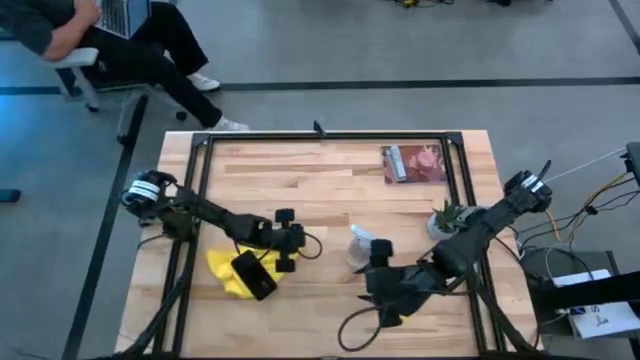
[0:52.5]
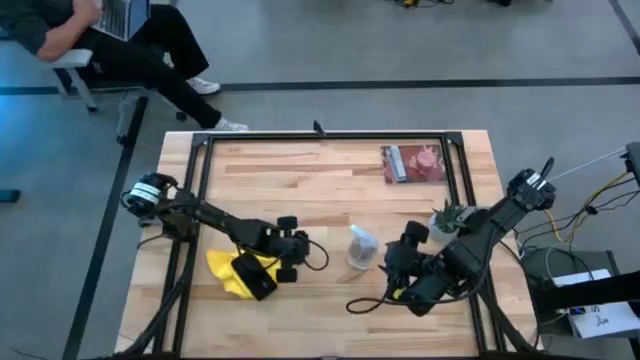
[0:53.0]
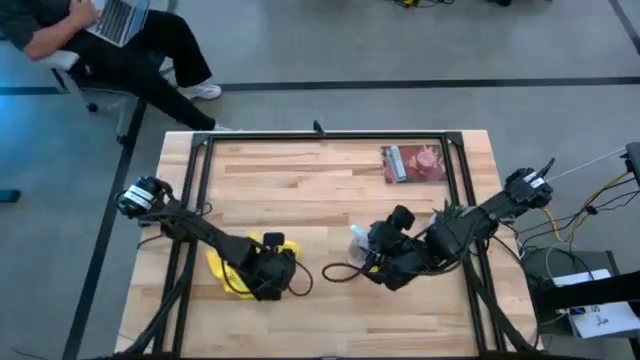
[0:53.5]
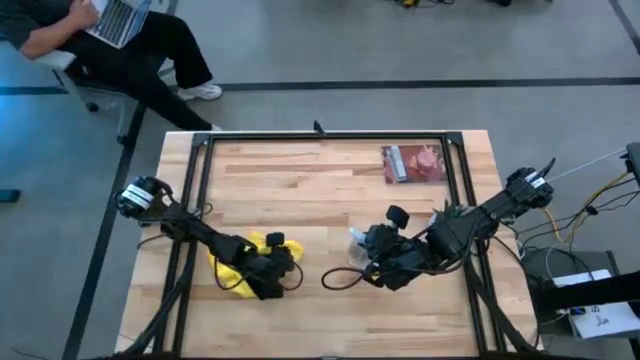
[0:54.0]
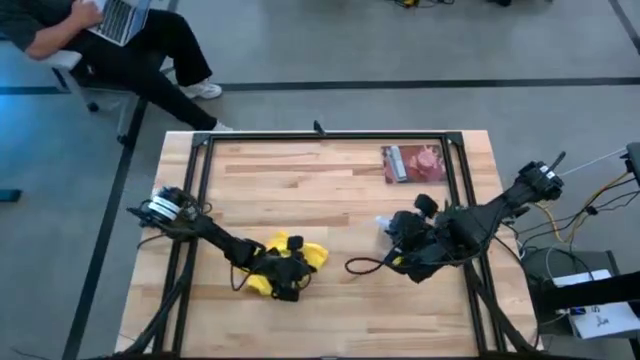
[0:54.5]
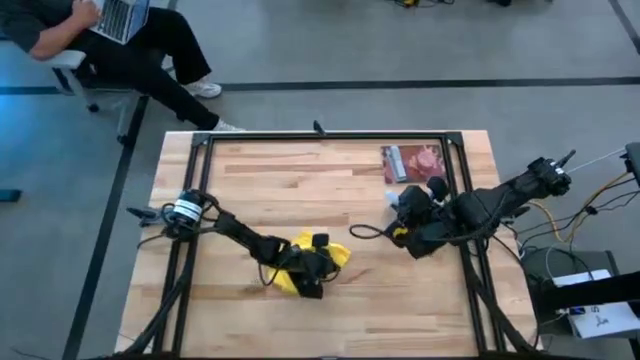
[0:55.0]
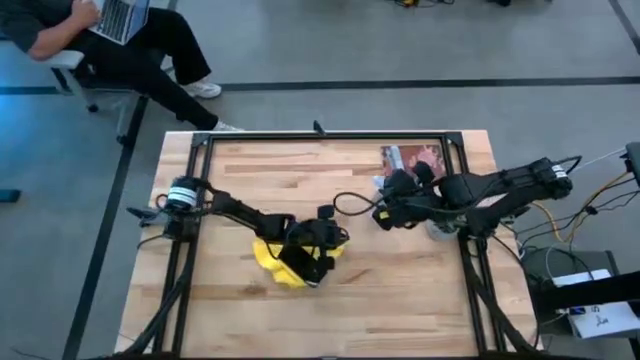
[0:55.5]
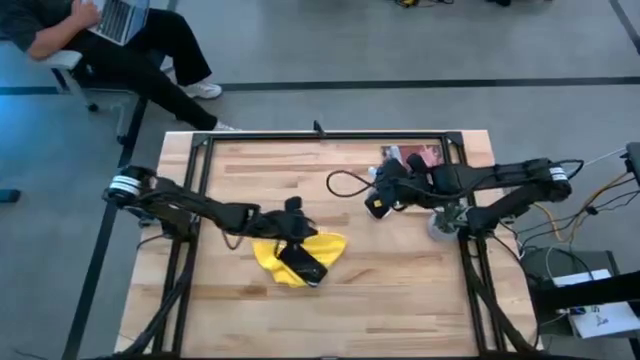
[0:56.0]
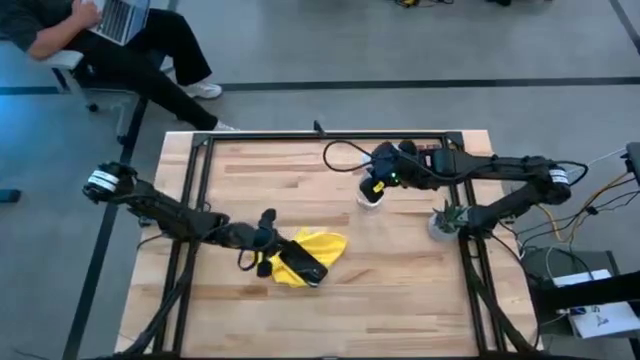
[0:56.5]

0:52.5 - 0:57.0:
Task: Apply microfiber cloth
Move the spray bottle to the top of the table

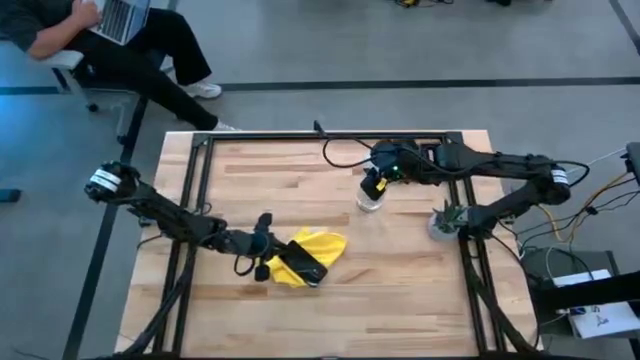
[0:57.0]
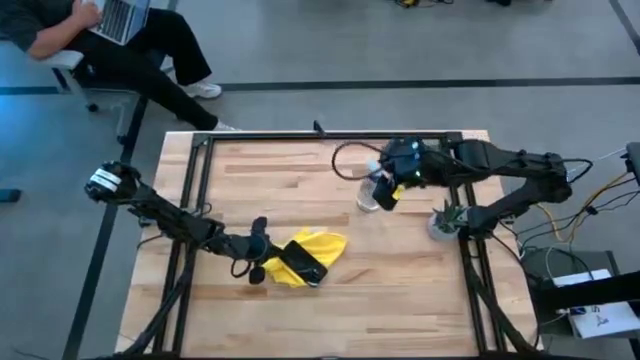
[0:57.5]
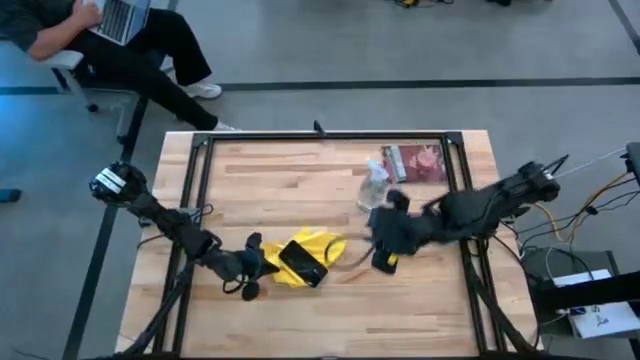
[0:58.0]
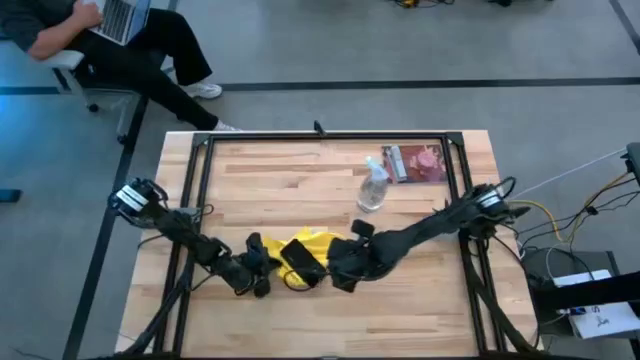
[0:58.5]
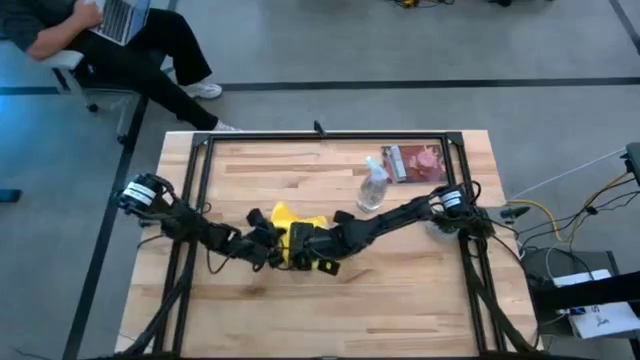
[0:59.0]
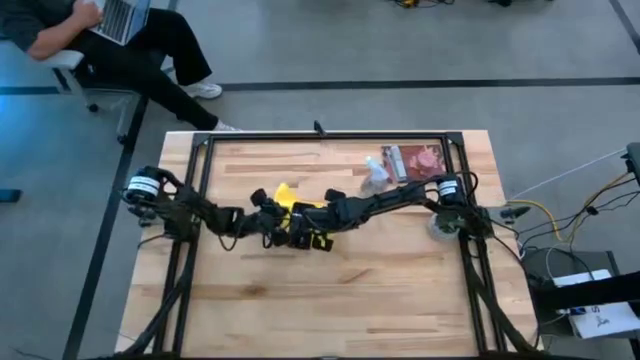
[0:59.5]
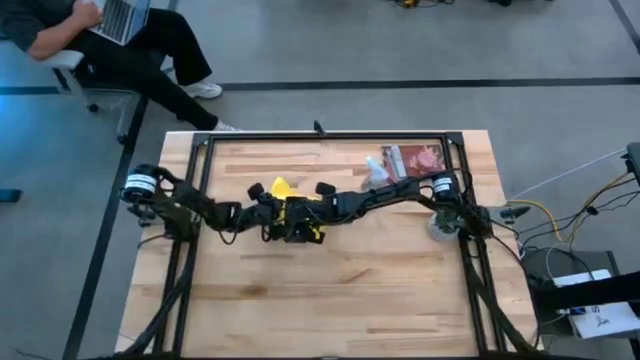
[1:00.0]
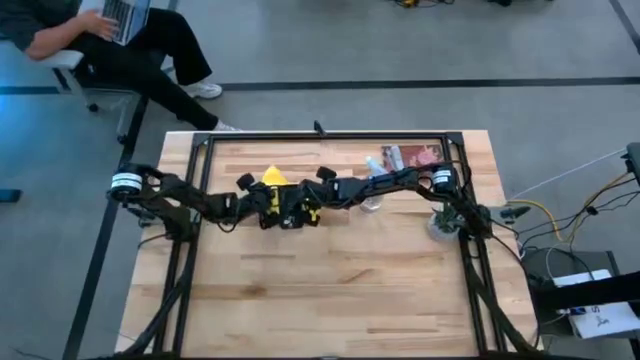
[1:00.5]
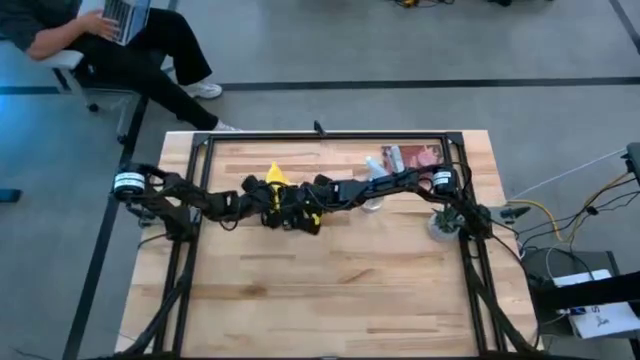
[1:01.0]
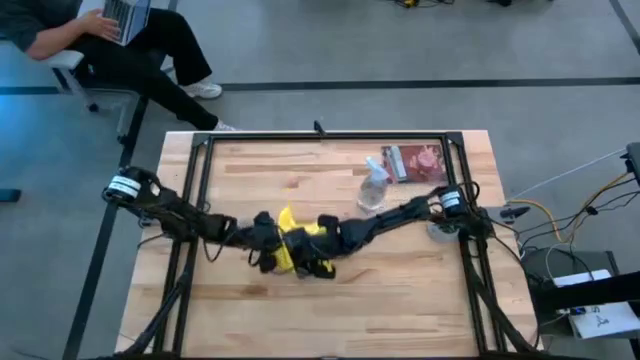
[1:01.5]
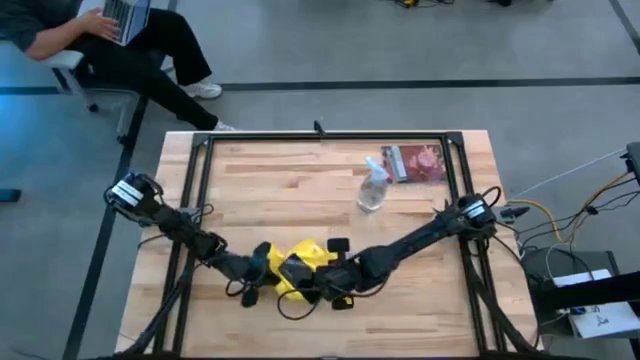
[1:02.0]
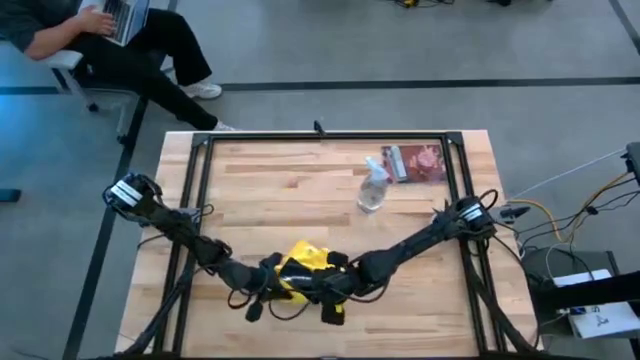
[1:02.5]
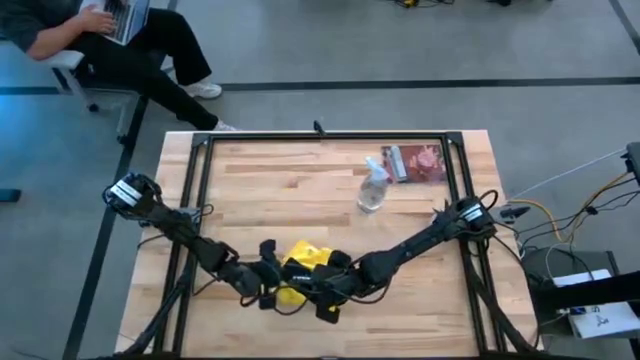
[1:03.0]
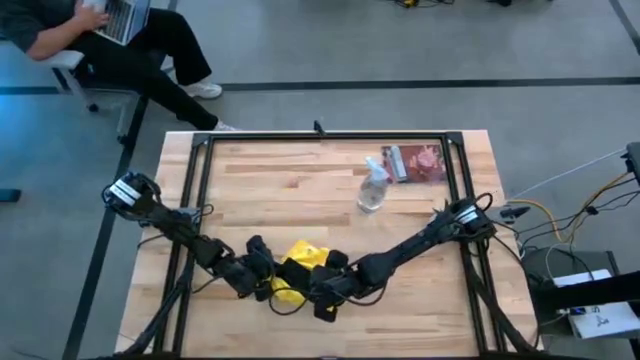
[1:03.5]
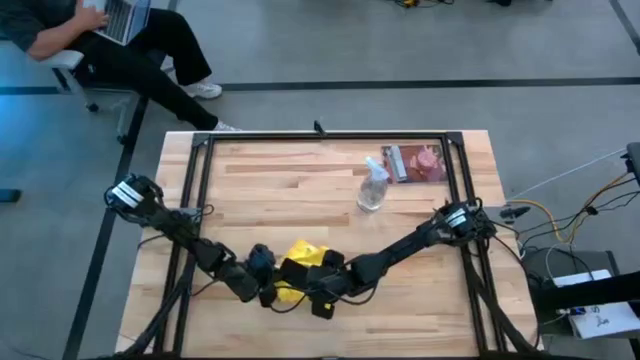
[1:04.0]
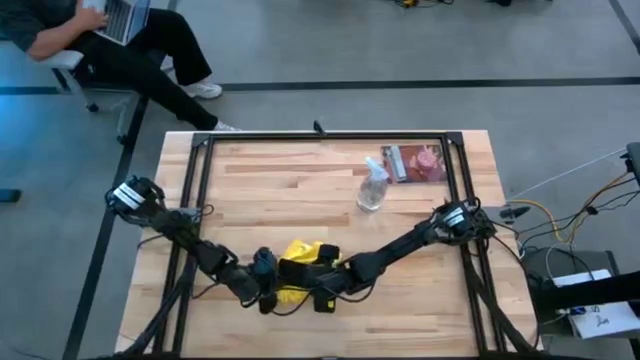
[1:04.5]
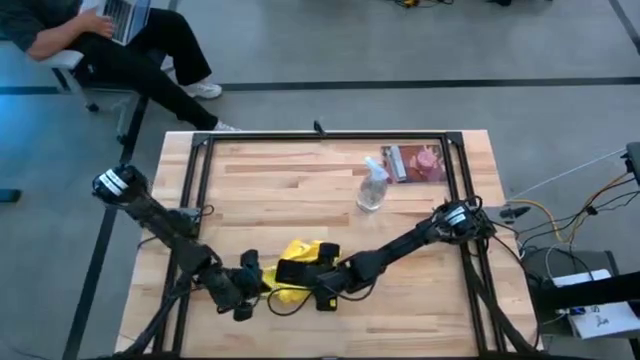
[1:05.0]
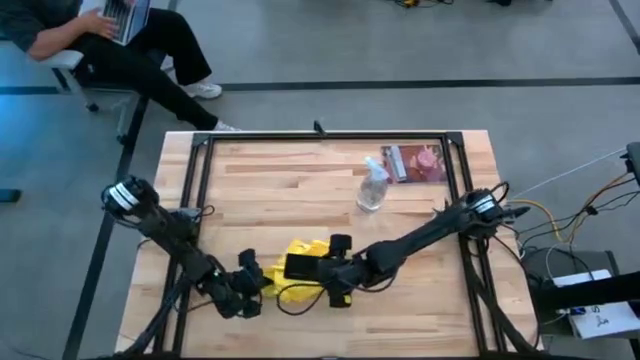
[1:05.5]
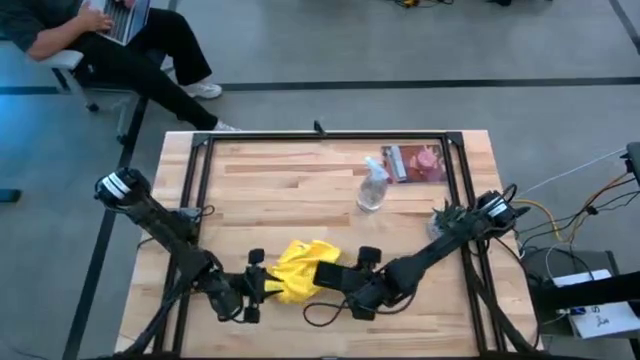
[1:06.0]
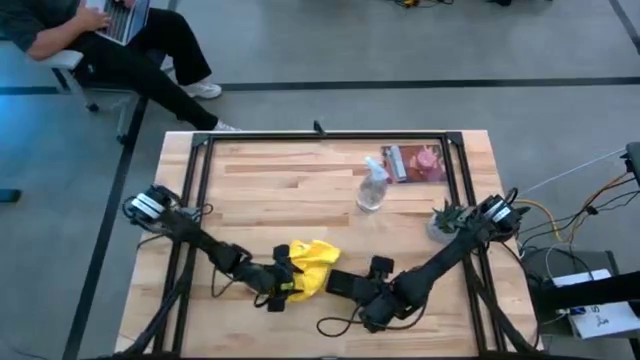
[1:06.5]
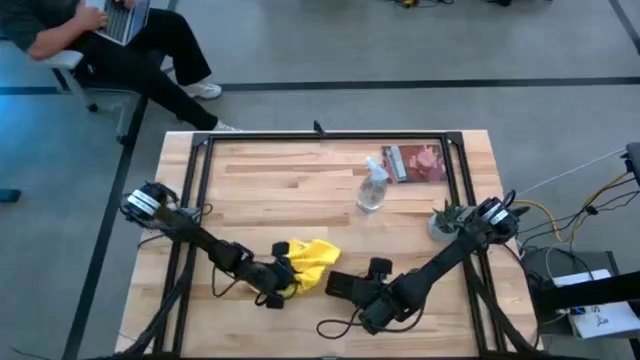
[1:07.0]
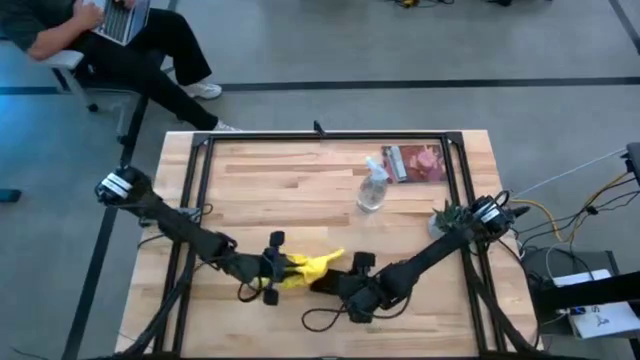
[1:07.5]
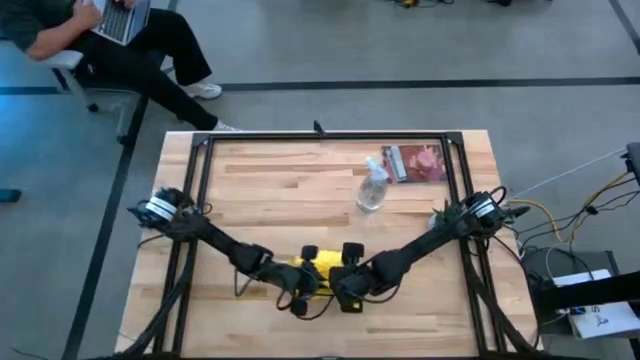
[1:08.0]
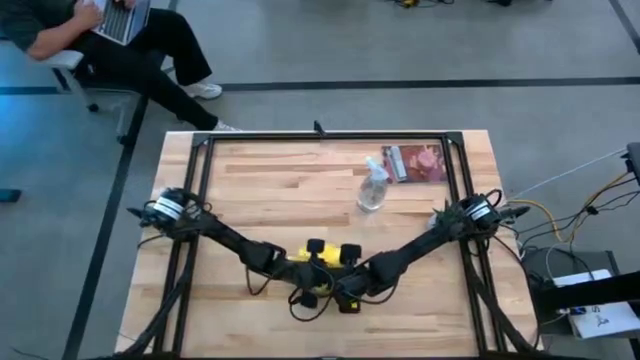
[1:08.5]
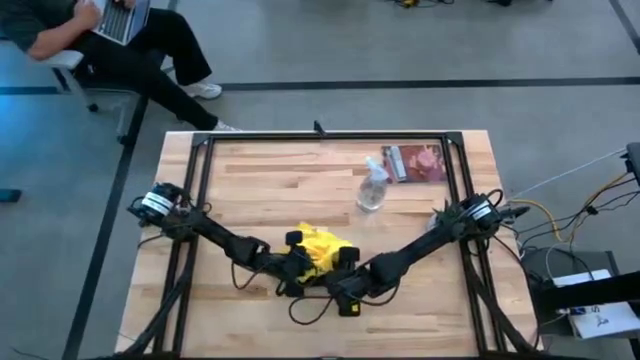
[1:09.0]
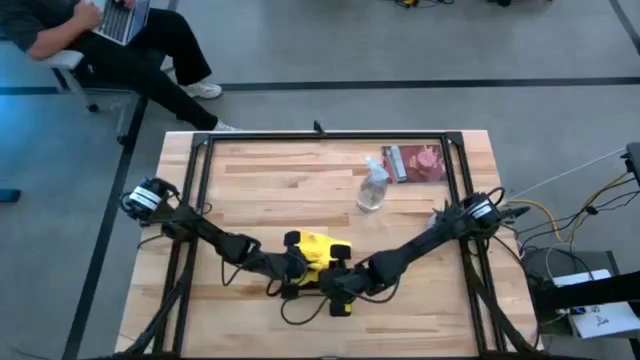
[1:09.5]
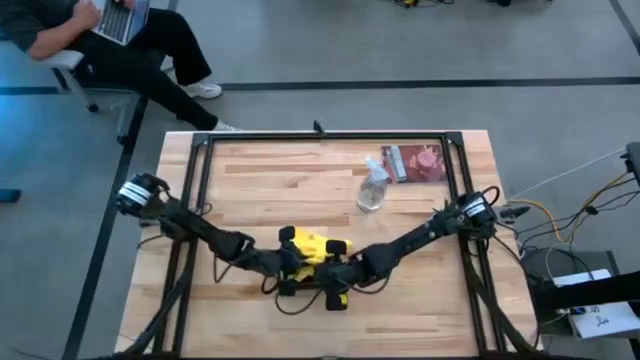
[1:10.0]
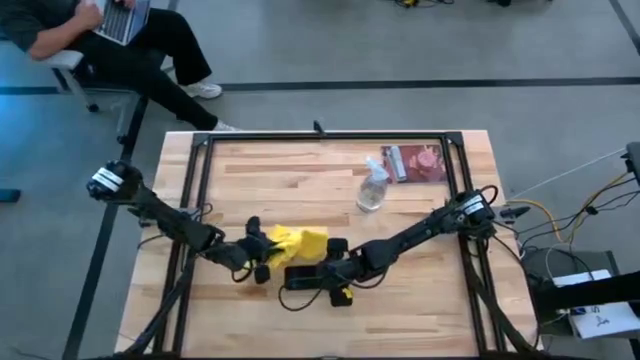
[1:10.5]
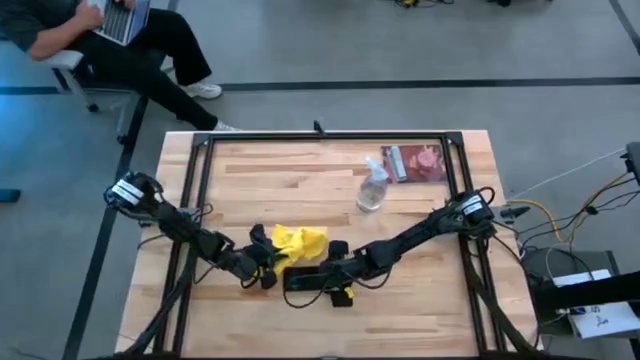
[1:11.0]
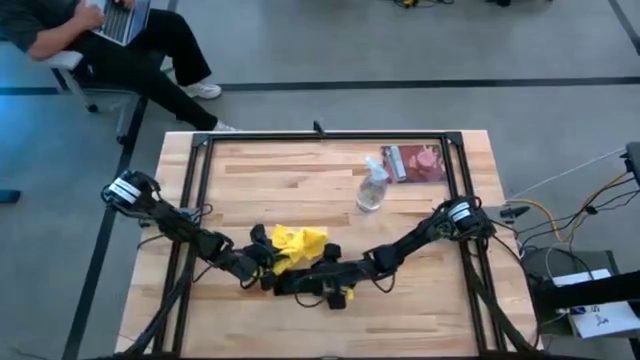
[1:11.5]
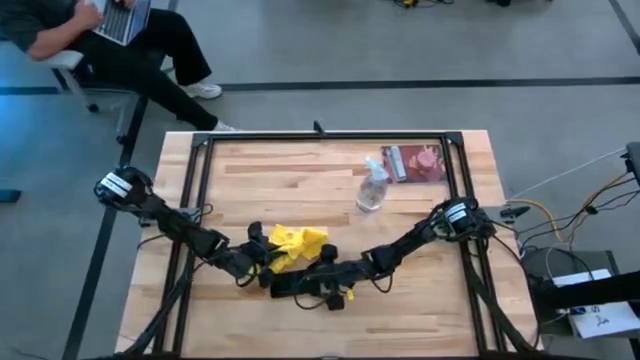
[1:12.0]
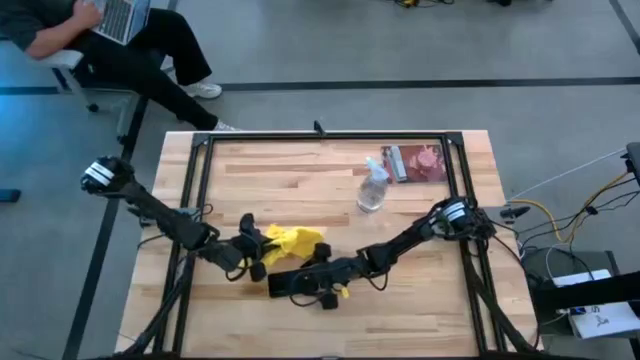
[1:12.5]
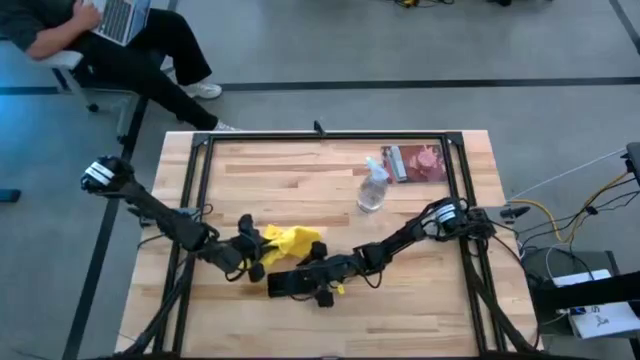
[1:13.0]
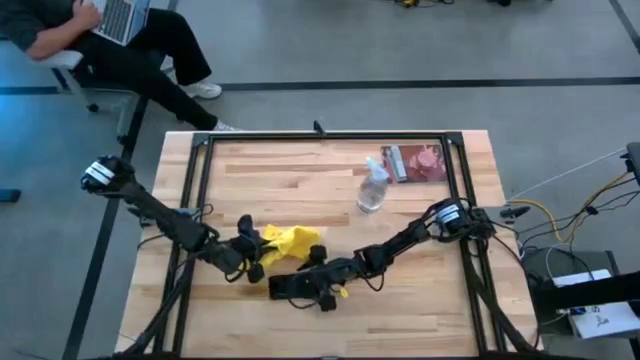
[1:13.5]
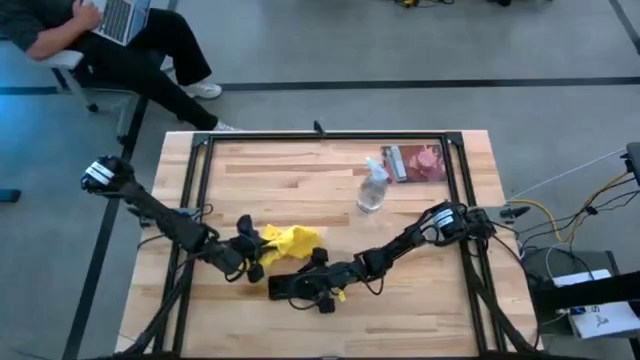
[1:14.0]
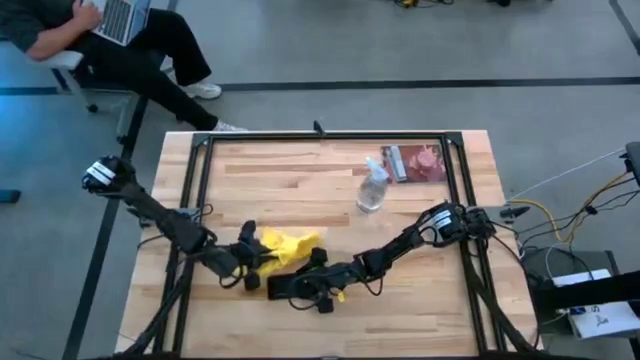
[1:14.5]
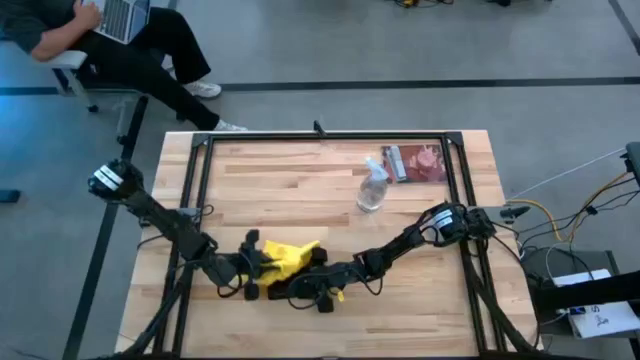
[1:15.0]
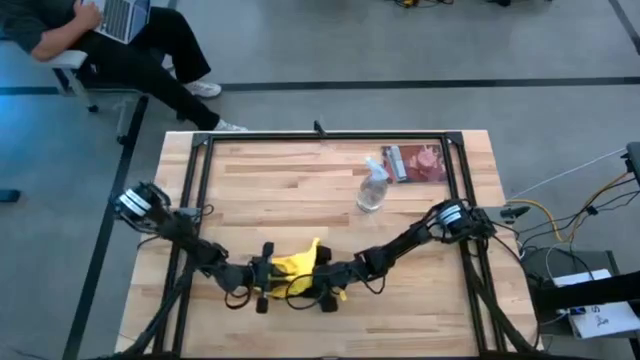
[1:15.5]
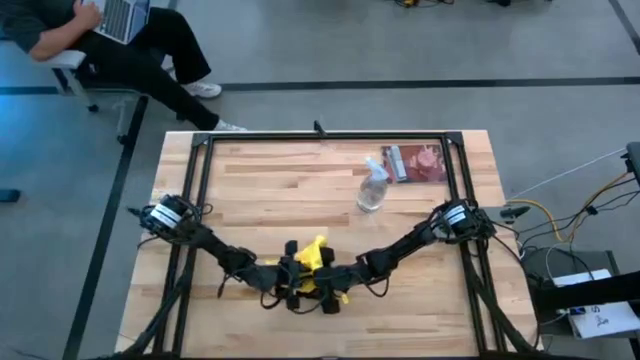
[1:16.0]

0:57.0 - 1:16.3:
Wipe the black cellphone with the yellow microfiber cloth
